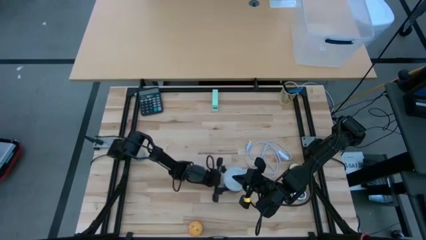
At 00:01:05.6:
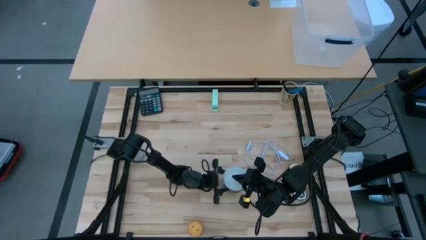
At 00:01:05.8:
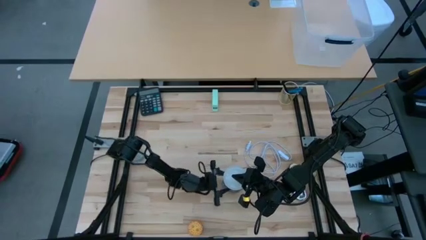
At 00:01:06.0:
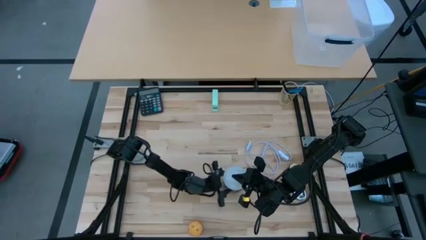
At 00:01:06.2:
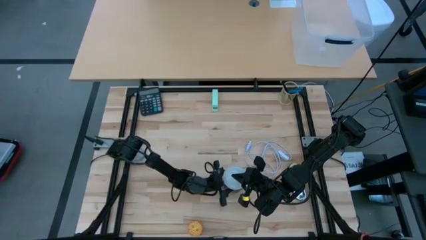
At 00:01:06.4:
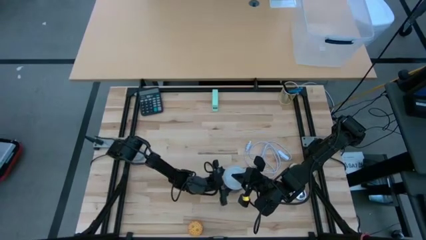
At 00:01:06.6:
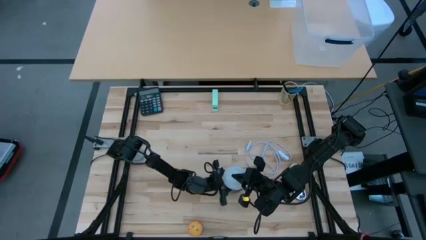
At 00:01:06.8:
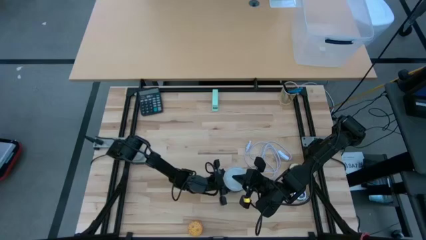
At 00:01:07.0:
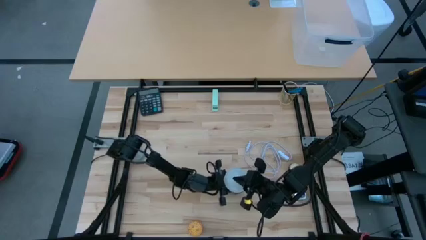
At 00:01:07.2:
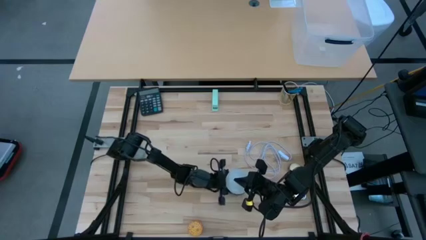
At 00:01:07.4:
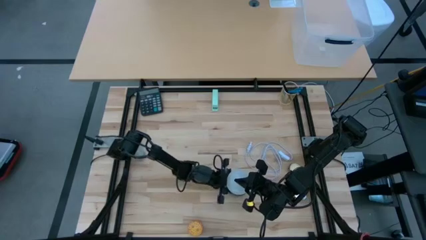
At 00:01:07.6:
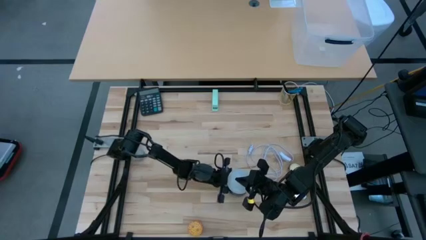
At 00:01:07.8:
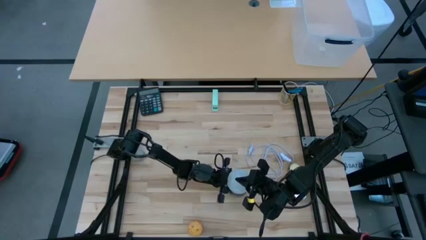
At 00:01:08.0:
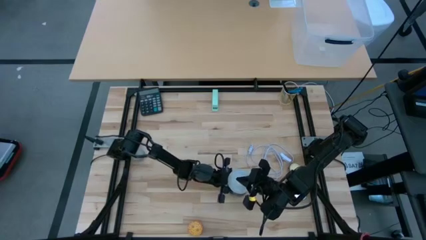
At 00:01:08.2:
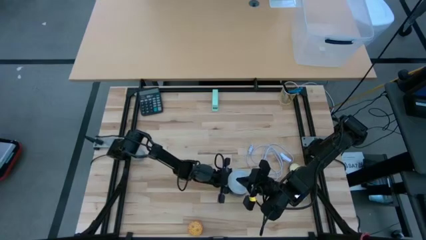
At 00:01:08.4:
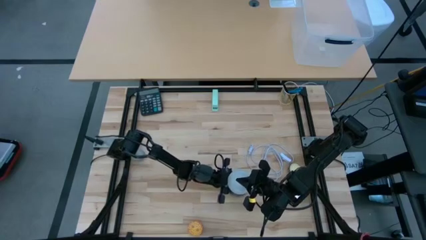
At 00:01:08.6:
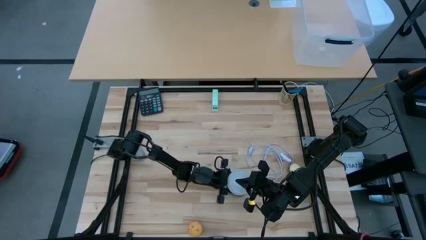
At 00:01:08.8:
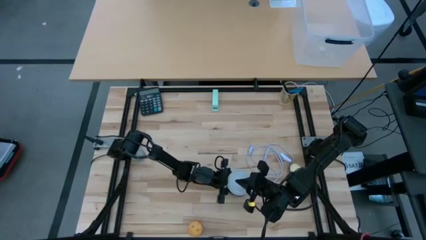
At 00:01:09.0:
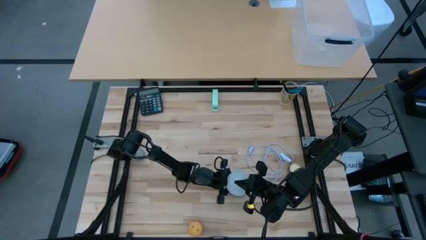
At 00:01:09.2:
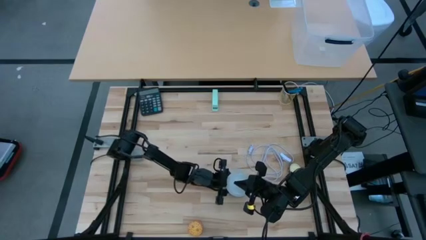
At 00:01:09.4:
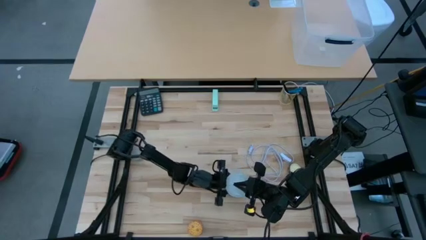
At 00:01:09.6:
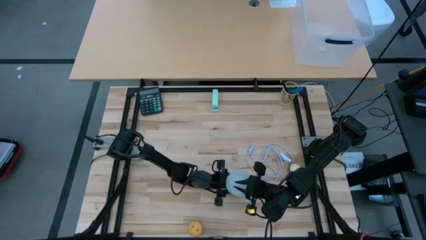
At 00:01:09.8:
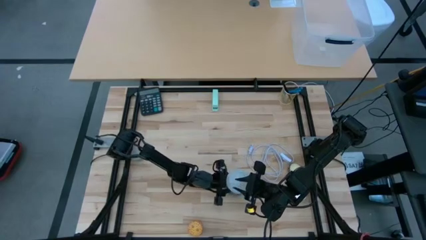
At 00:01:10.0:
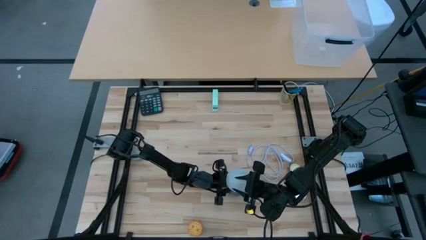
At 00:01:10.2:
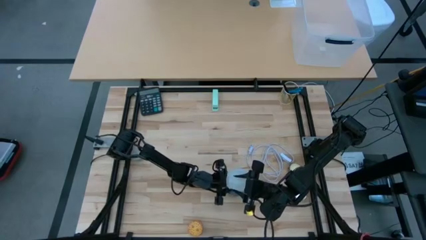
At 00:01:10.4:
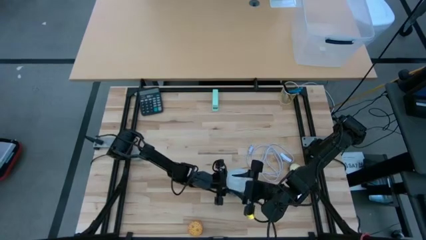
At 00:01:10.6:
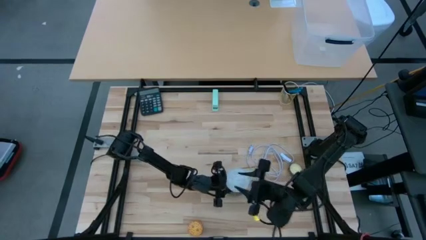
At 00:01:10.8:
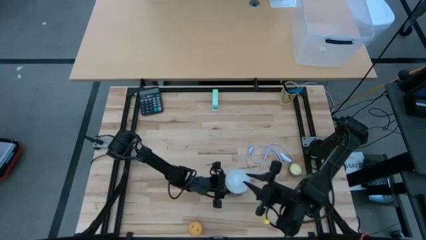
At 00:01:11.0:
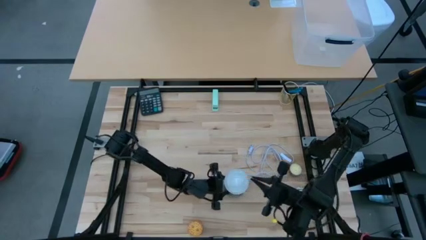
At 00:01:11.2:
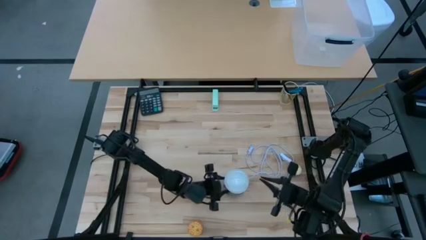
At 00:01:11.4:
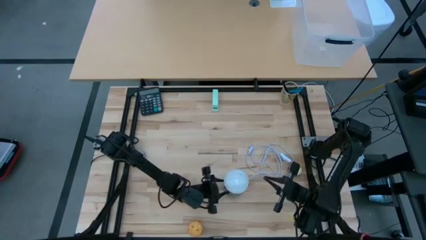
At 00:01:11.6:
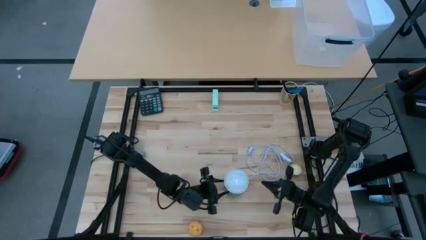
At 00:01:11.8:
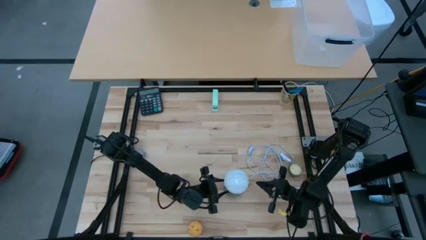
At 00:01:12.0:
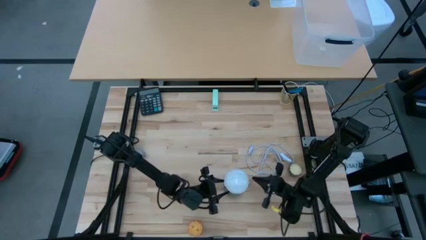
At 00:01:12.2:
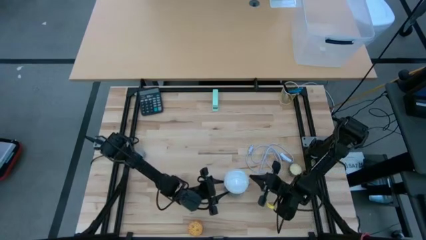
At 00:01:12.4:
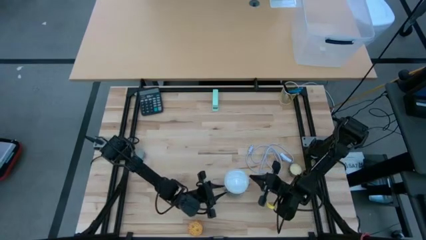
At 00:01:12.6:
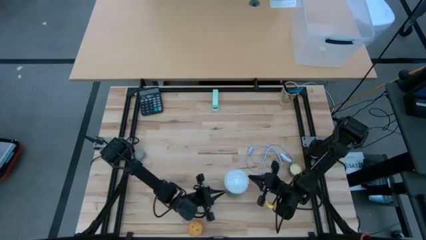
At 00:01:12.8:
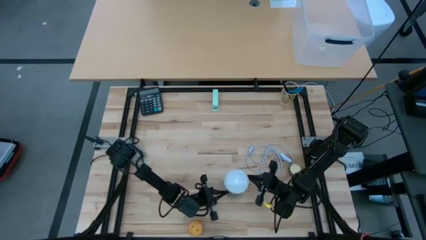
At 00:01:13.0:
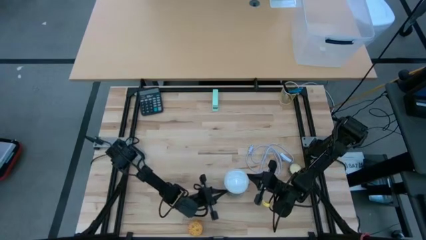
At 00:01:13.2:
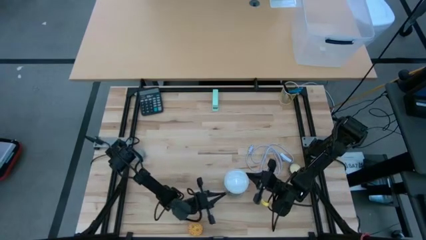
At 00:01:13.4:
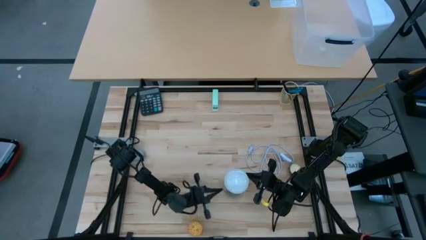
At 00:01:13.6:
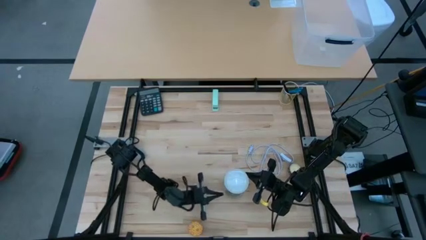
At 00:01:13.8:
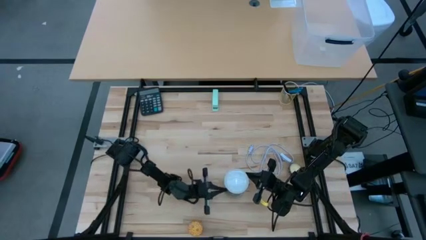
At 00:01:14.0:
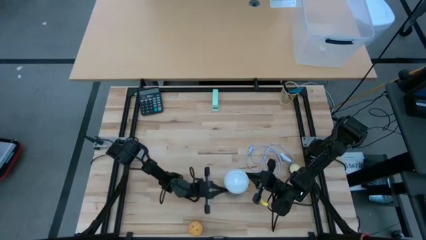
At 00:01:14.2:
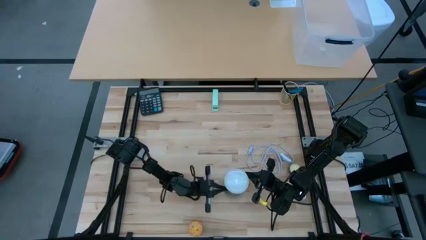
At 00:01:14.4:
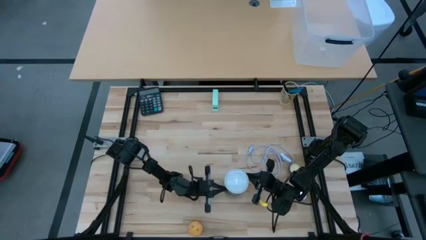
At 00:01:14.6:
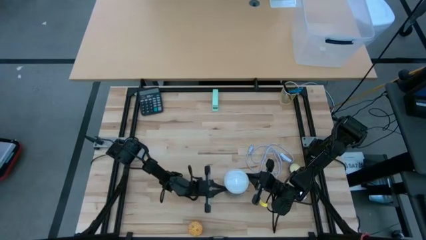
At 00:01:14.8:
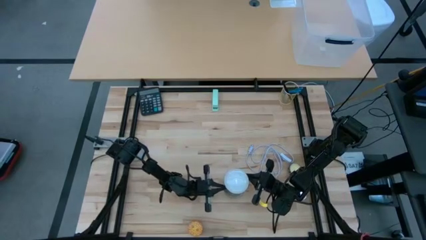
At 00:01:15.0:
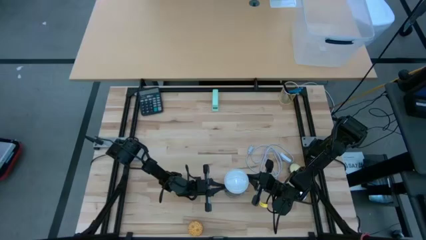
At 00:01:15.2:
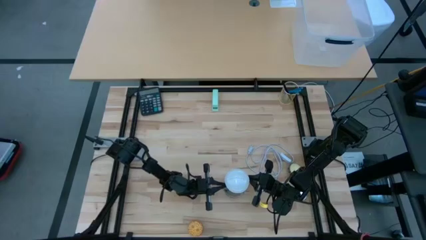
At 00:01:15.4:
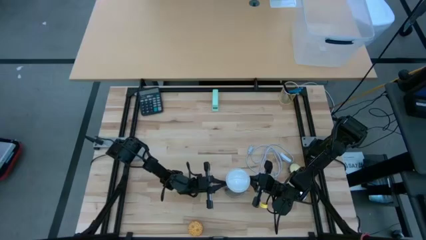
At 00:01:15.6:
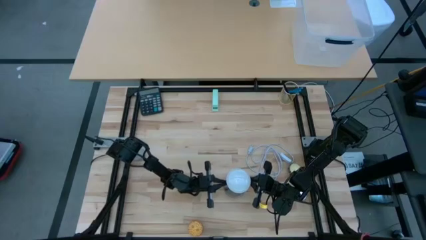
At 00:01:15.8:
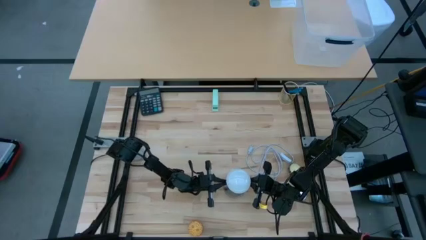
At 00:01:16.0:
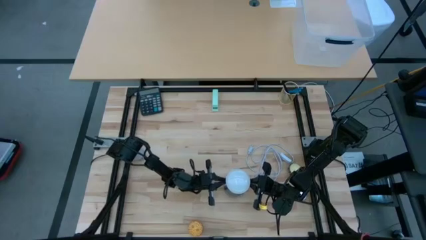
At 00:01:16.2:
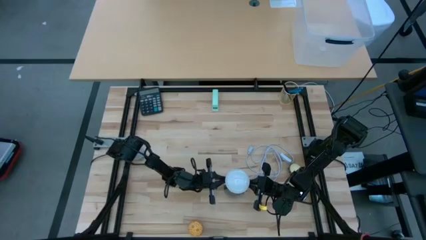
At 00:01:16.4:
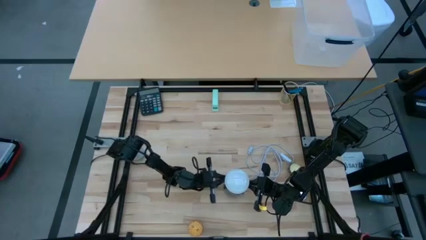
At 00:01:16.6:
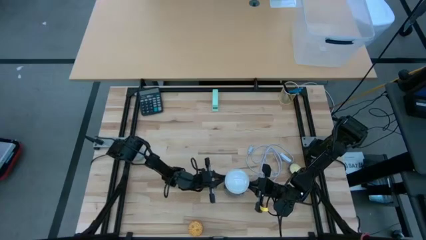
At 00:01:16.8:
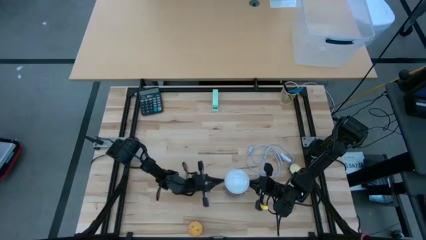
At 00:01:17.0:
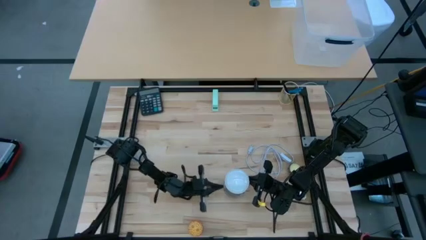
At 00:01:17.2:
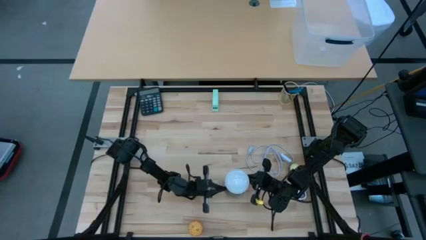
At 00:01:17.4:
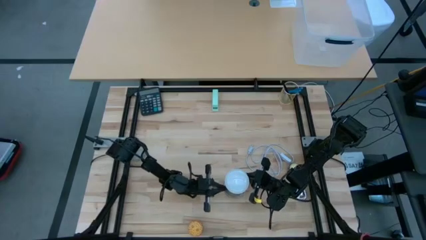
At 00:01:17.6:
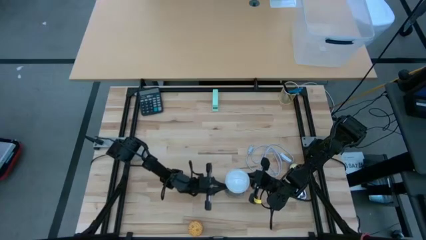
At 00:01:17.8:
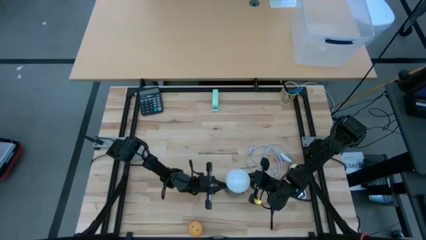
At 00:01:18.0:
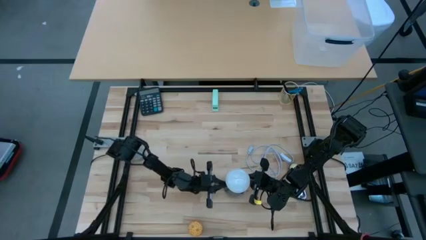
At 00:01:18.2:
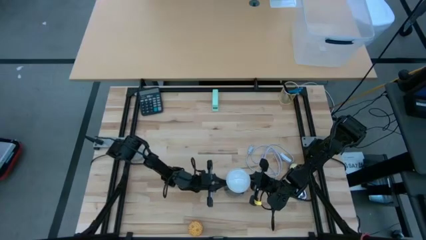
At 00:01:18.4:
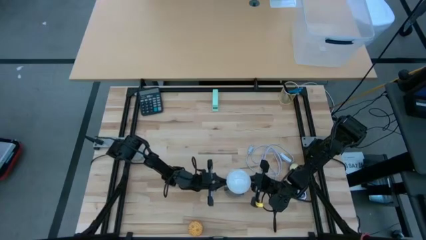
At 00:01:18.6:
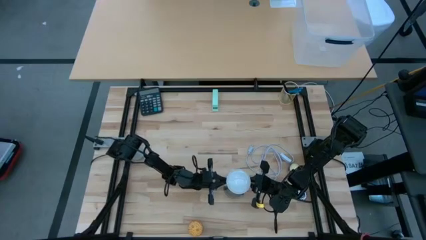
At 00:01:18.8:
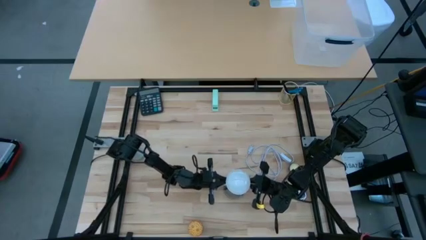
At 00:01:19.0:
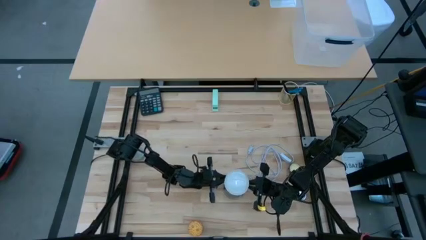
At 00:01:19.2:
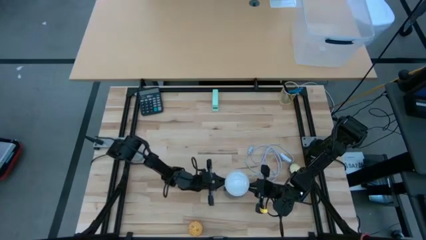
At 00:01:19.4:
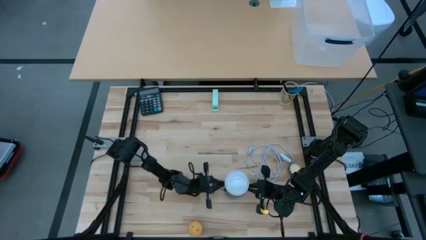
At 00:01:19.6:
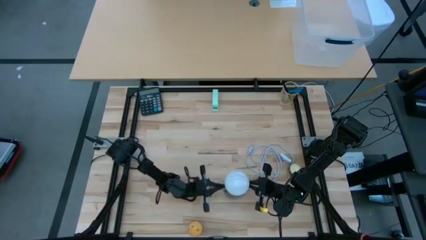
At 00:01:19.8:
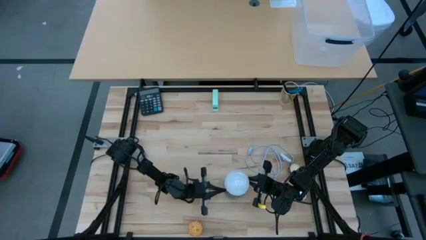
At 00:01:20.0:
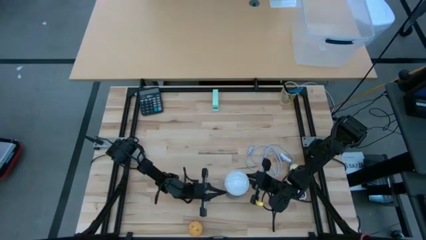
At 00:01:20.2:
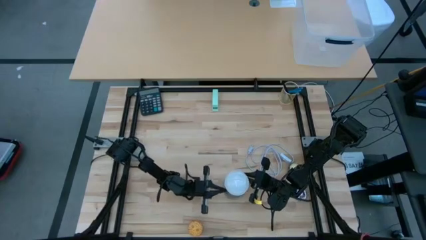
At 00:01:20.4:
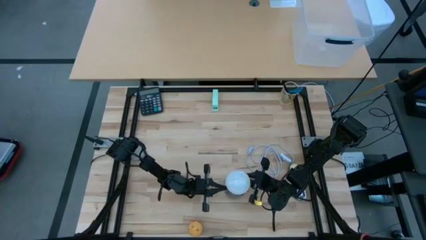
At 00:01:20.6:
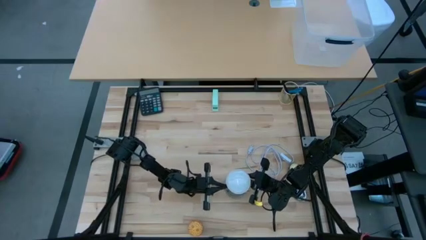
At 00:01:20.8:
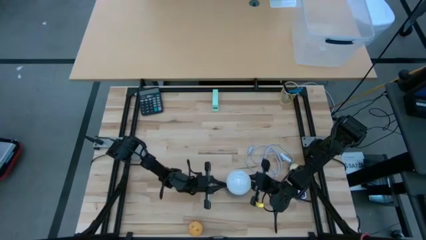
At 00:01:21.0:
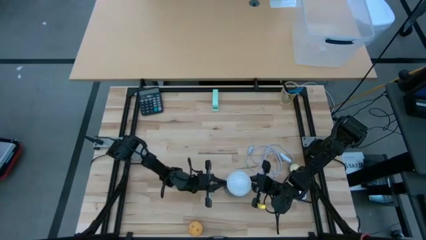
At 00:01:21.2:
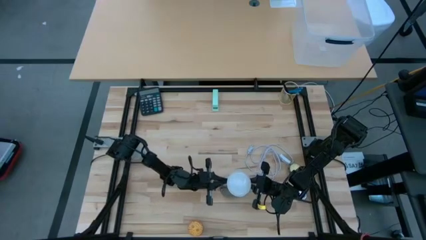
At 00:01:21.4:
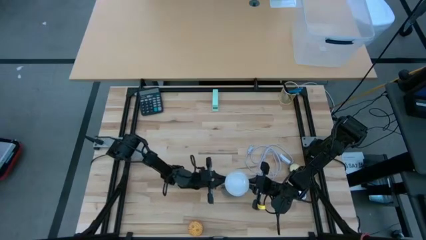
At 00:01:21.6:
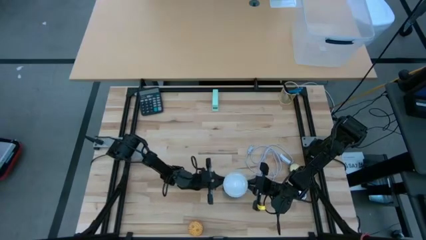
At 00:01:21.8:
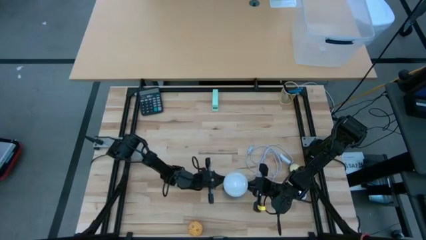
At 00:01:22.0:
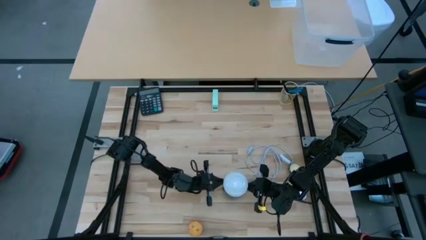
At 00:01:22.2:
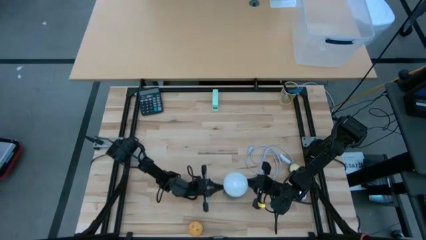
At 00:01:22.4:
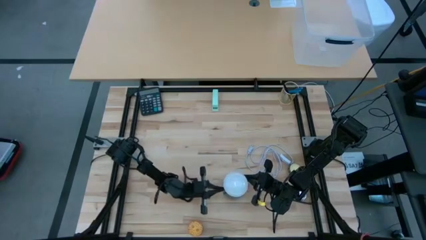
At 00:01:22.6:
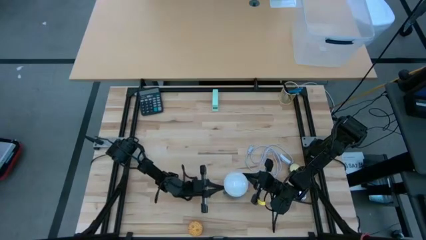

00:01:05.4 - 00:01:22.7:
Task: Screw lightbulb
Insert the white lightbulb into the silver lamp
